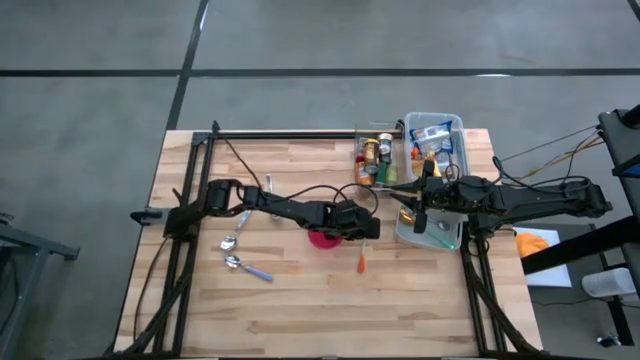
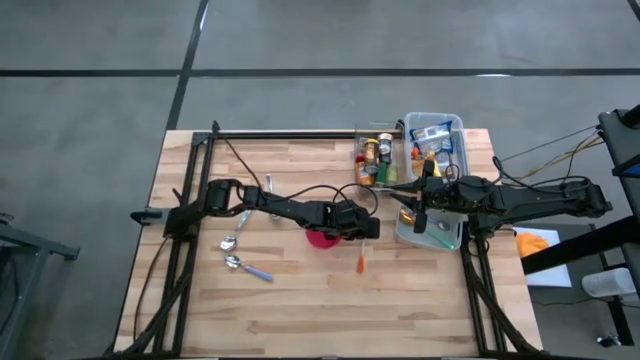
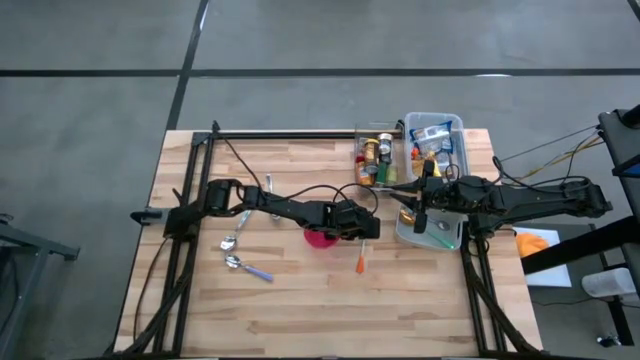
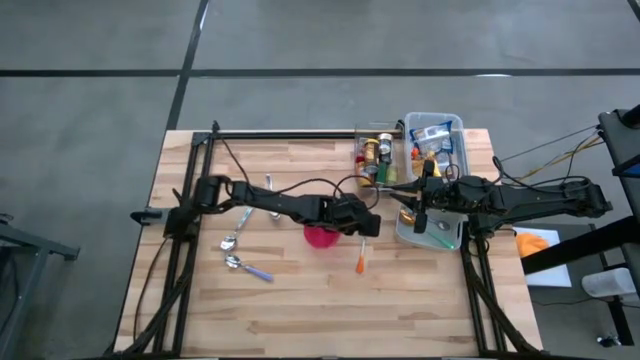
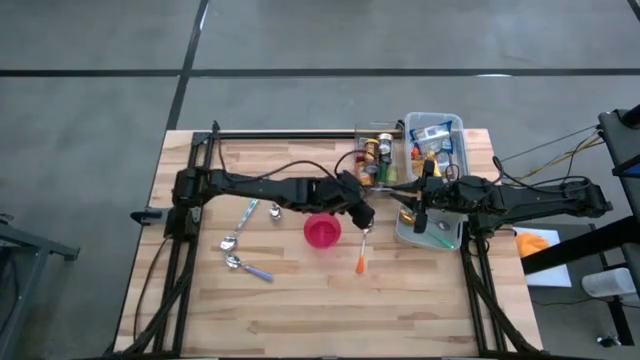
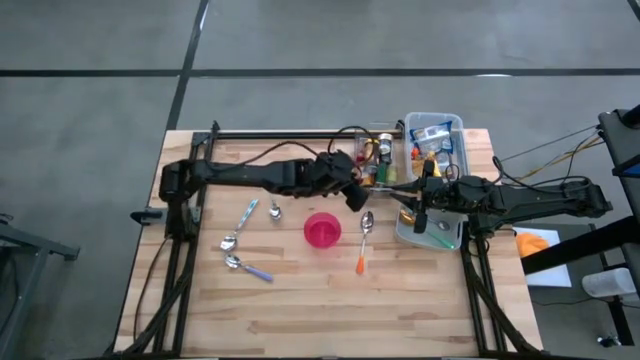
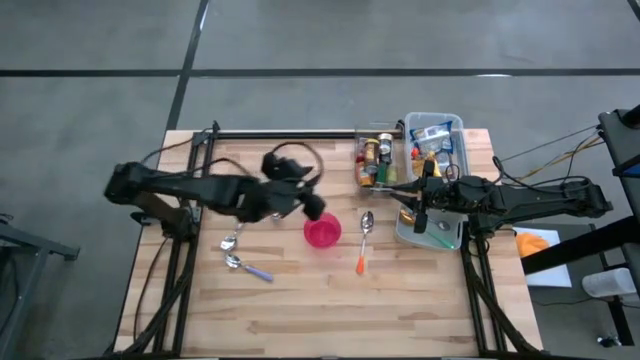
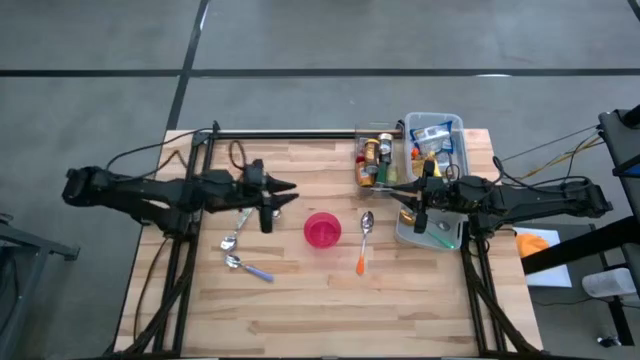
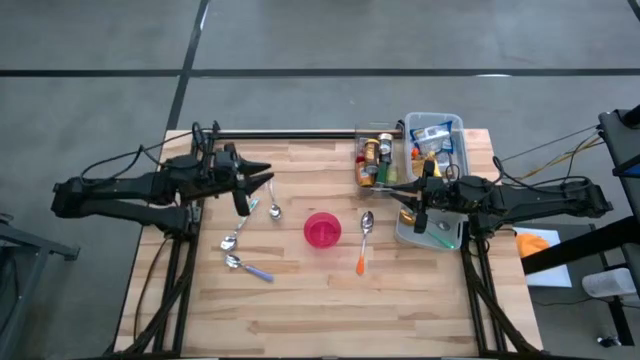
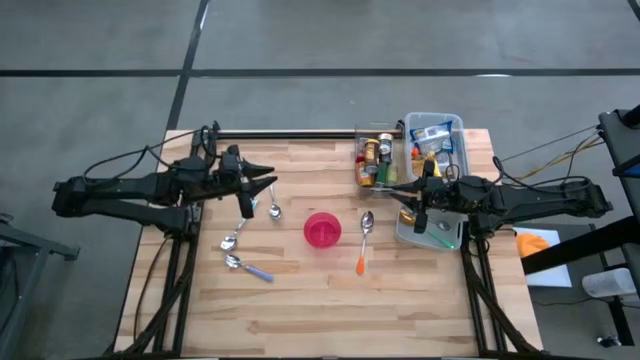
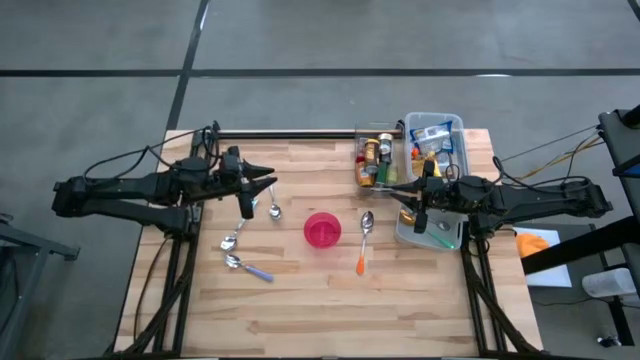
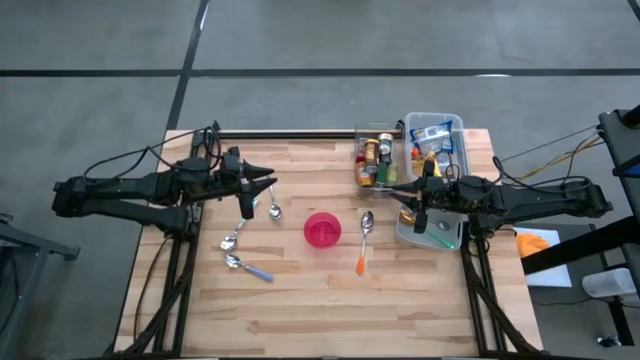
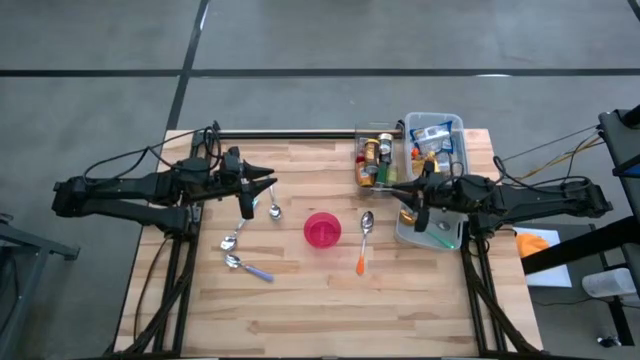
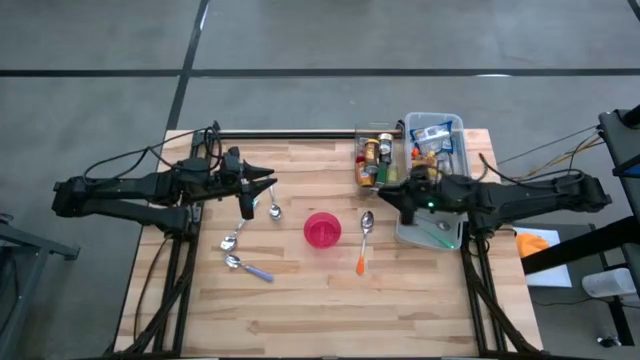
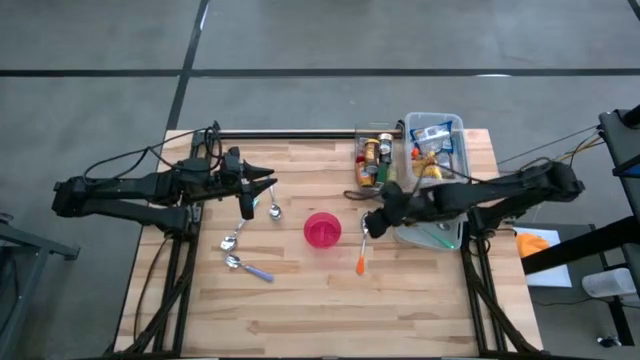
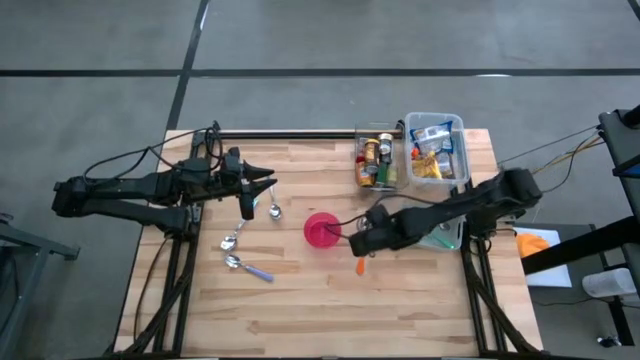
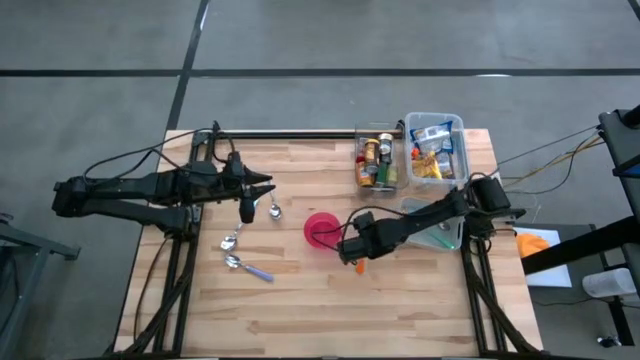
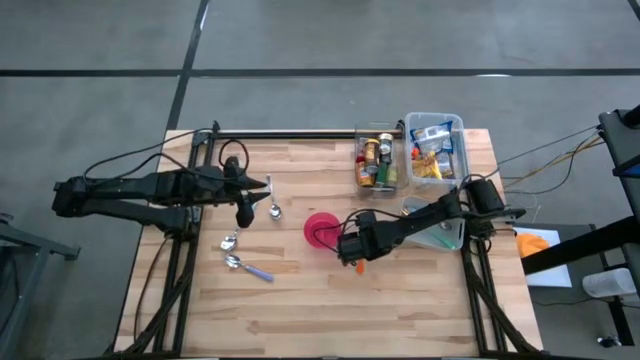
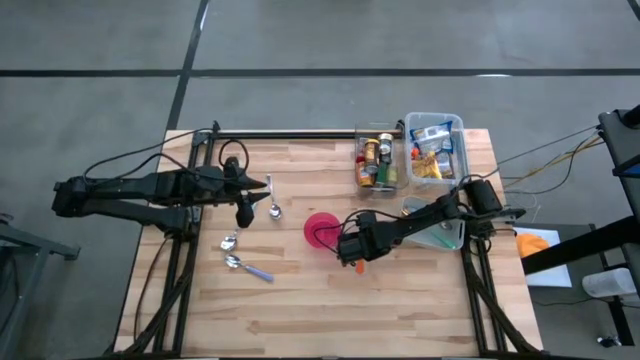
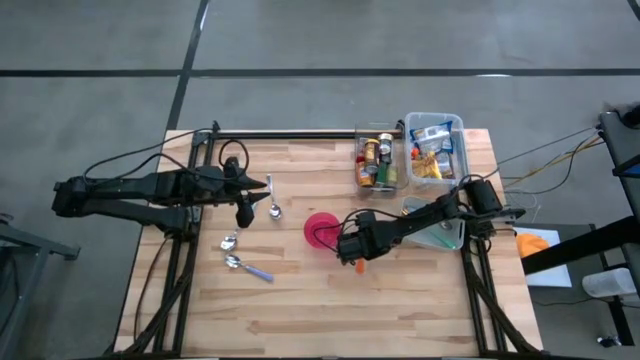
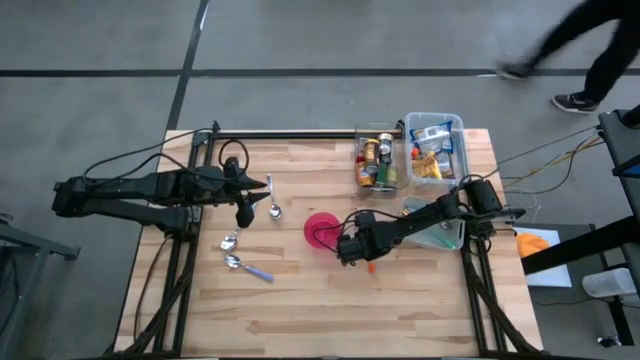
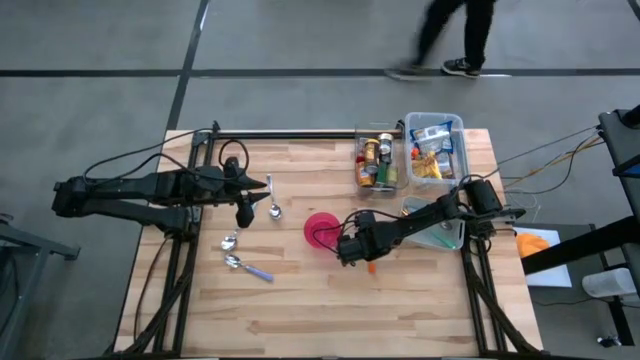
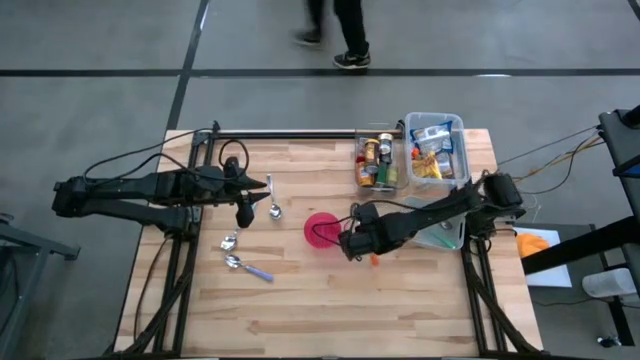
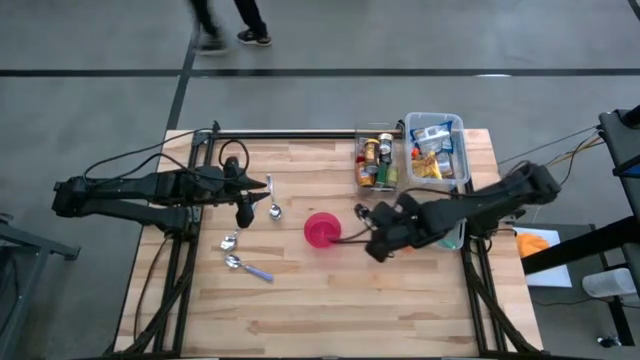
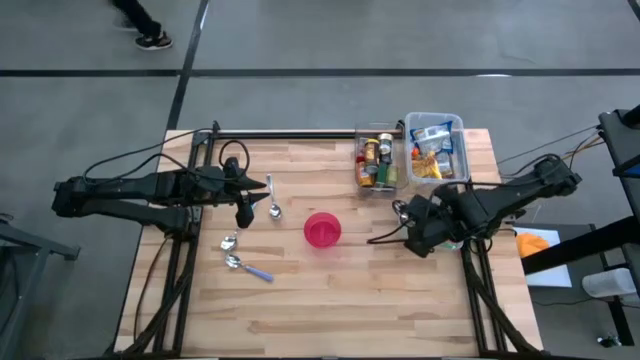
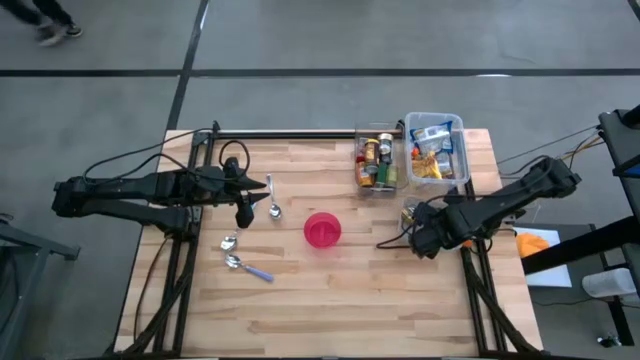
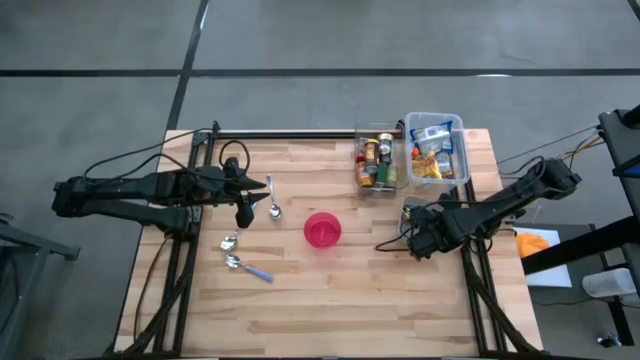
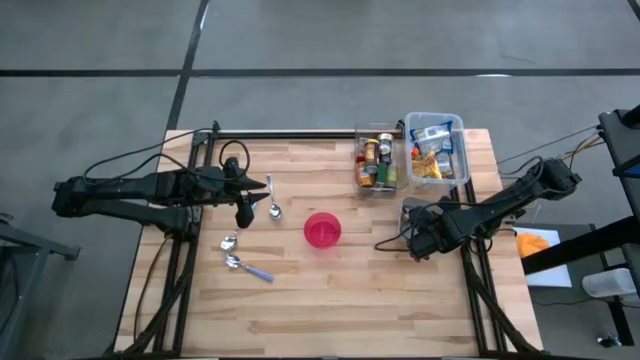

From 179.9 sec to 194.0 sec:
Put the orange spoon into the gray bin
